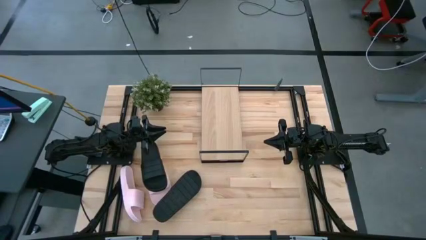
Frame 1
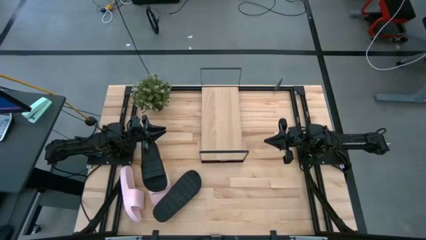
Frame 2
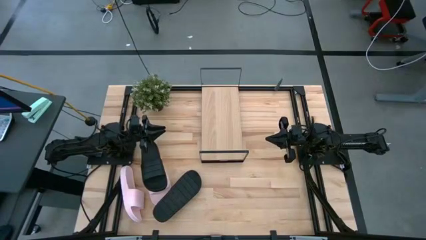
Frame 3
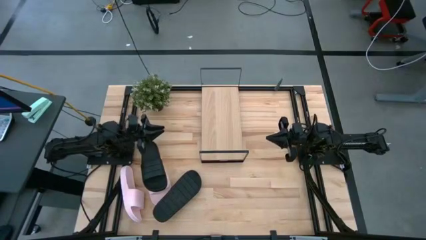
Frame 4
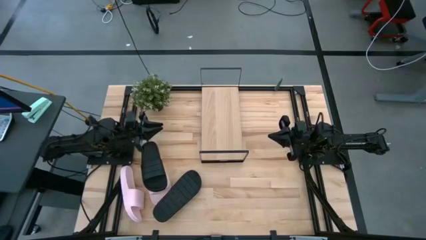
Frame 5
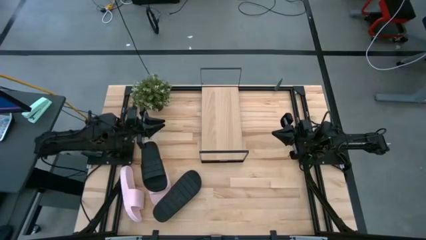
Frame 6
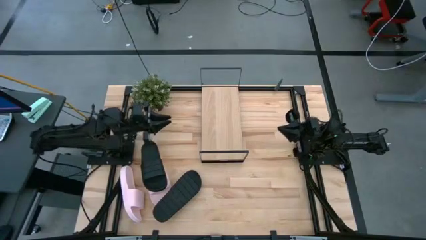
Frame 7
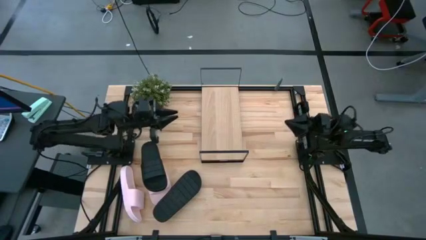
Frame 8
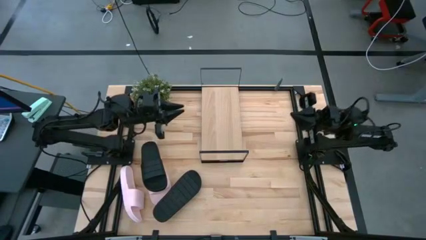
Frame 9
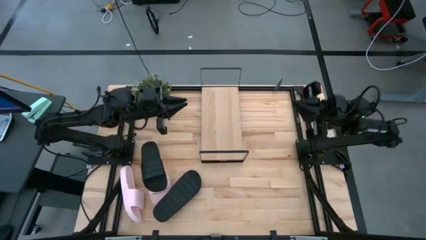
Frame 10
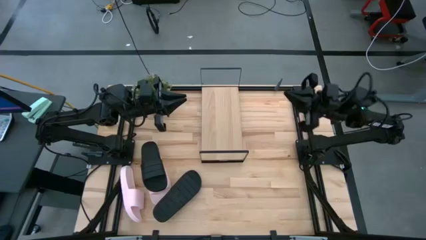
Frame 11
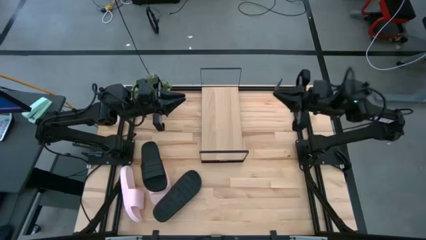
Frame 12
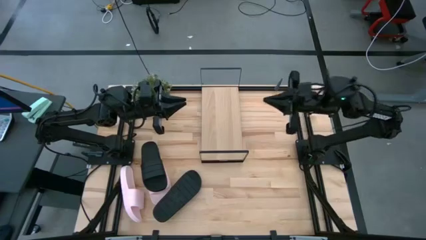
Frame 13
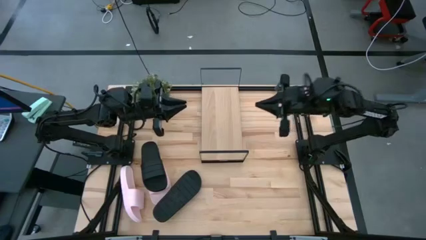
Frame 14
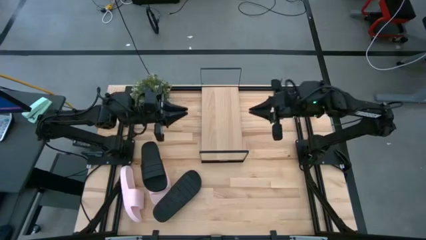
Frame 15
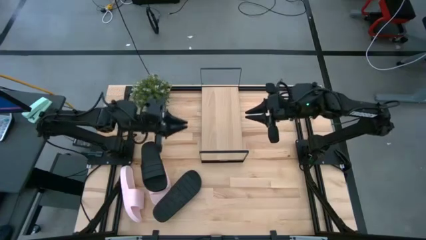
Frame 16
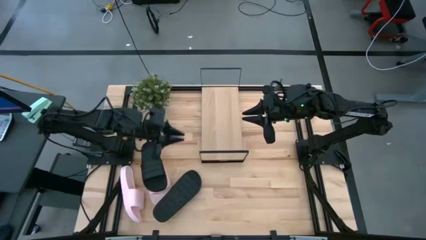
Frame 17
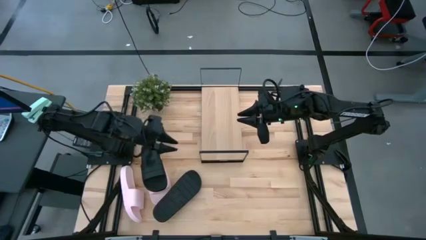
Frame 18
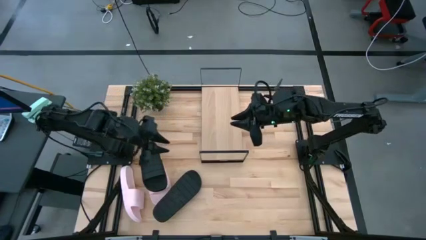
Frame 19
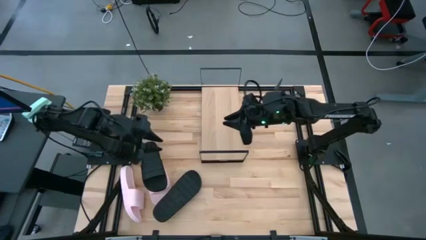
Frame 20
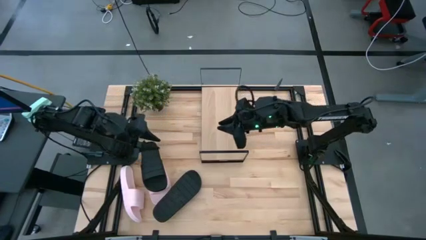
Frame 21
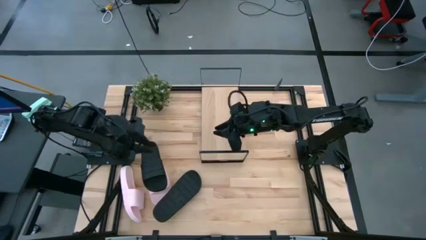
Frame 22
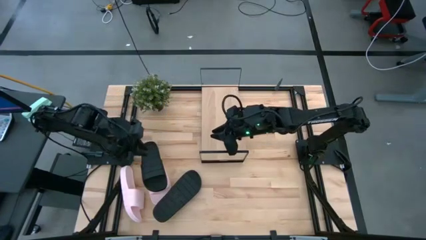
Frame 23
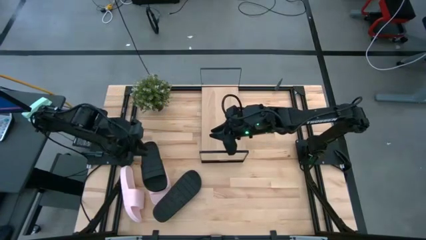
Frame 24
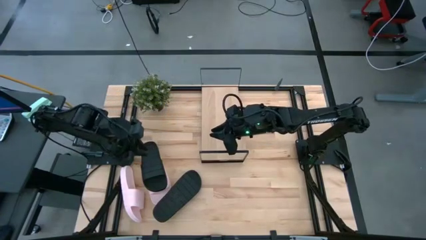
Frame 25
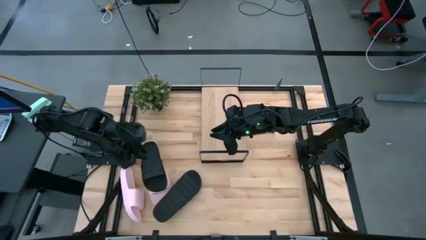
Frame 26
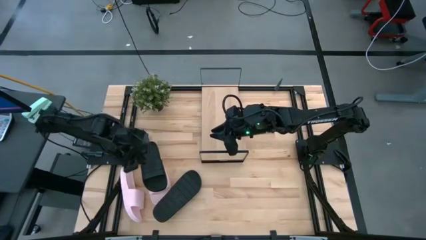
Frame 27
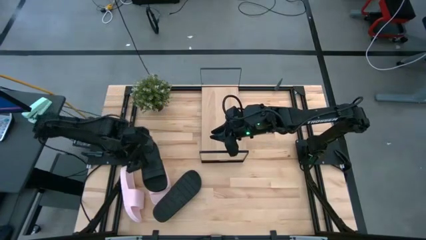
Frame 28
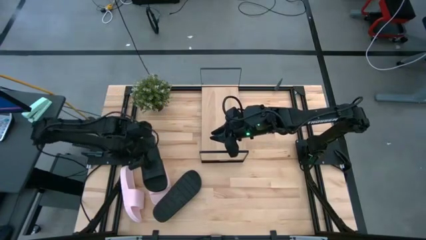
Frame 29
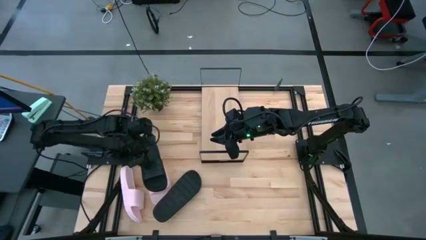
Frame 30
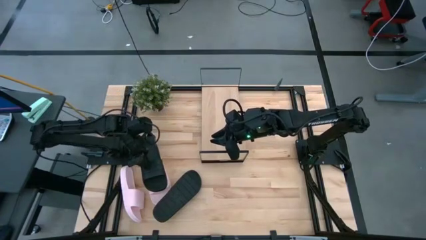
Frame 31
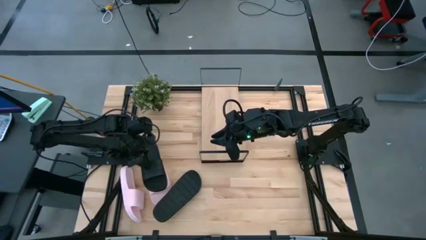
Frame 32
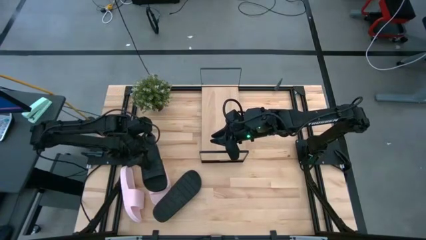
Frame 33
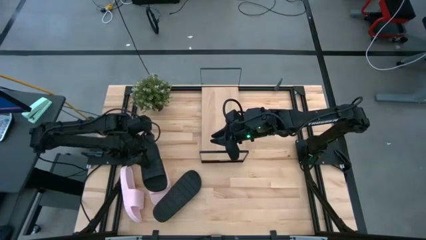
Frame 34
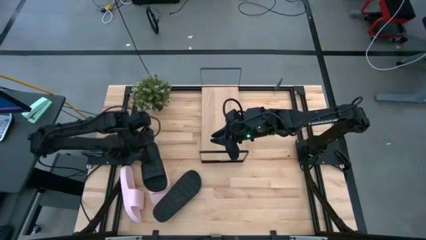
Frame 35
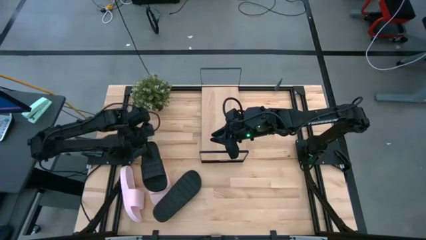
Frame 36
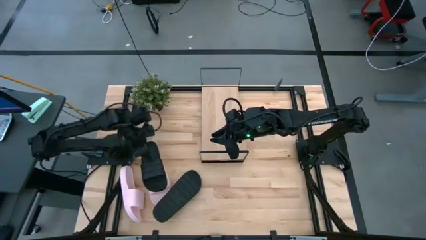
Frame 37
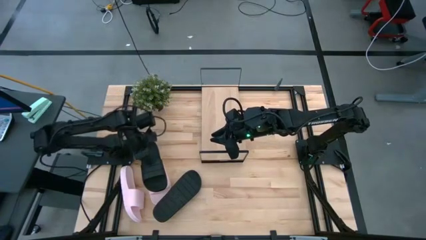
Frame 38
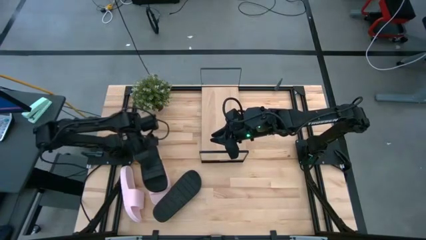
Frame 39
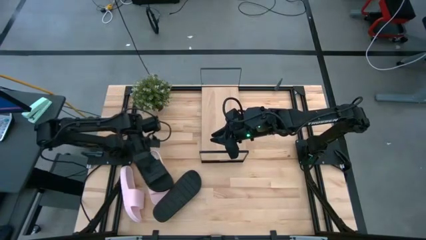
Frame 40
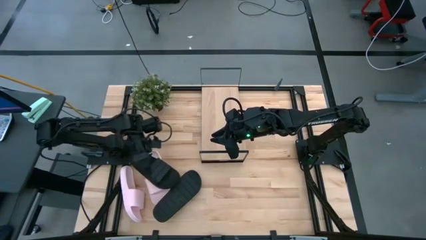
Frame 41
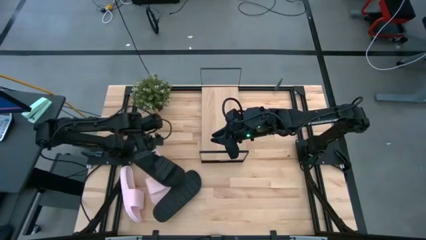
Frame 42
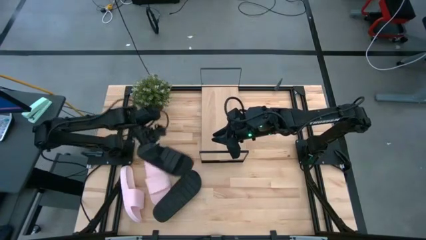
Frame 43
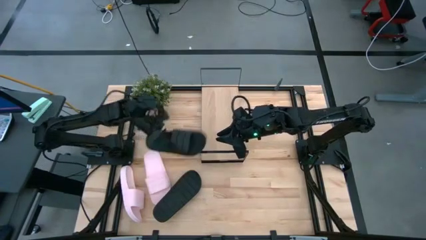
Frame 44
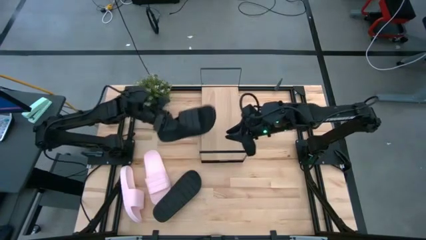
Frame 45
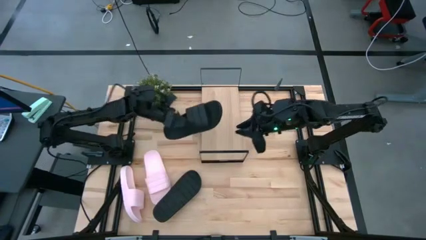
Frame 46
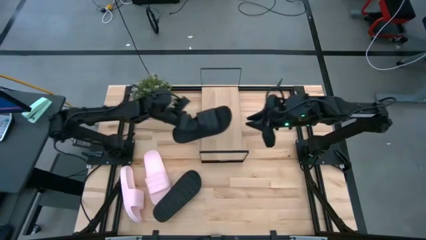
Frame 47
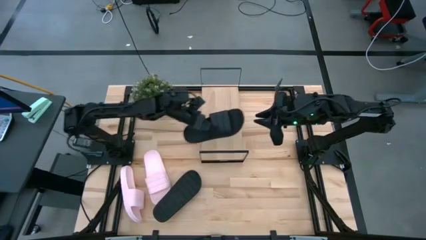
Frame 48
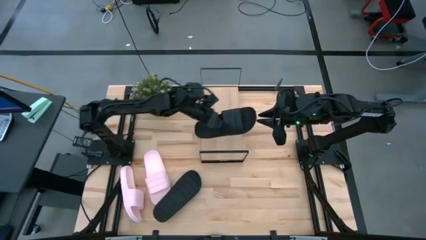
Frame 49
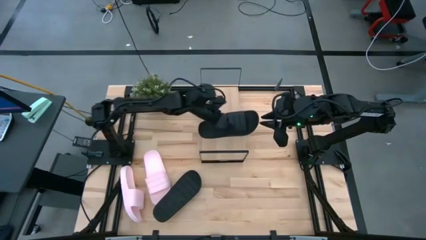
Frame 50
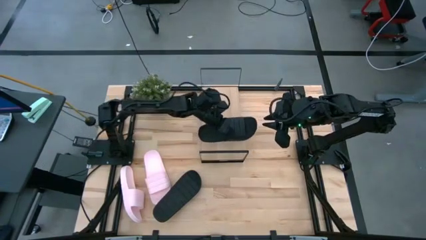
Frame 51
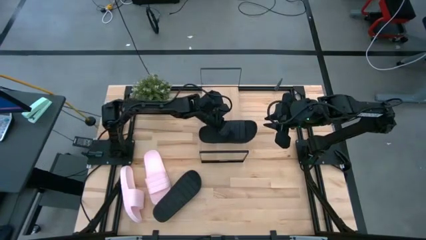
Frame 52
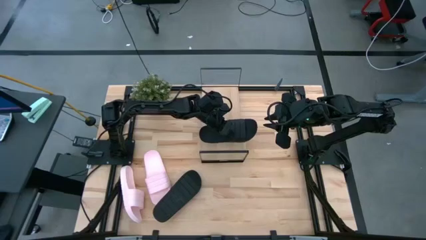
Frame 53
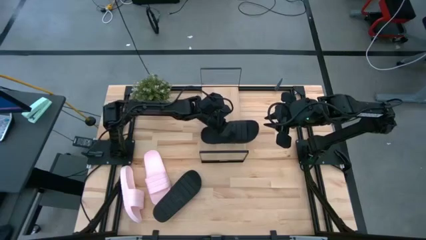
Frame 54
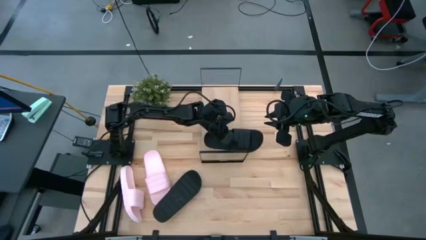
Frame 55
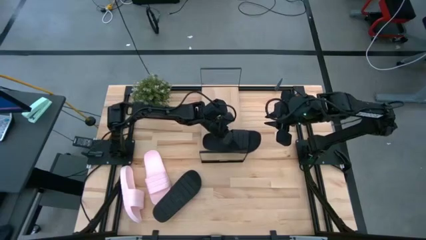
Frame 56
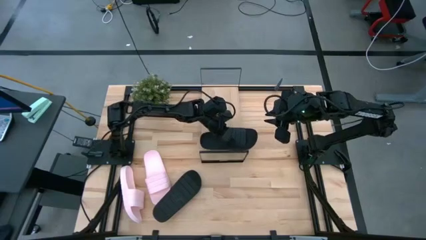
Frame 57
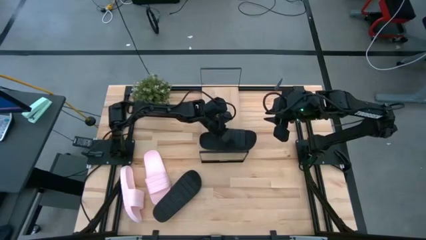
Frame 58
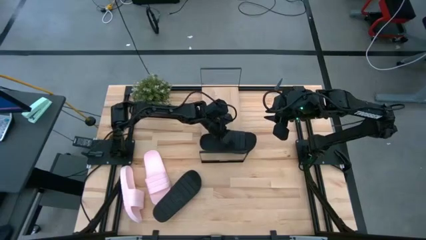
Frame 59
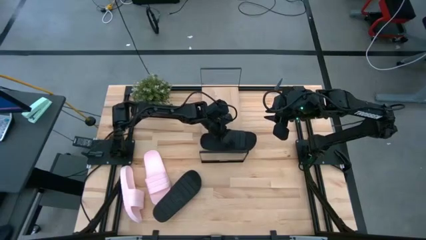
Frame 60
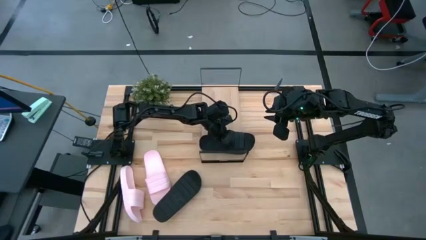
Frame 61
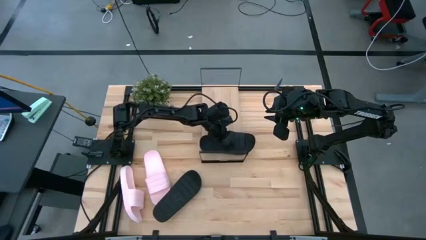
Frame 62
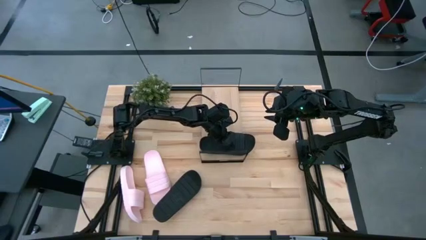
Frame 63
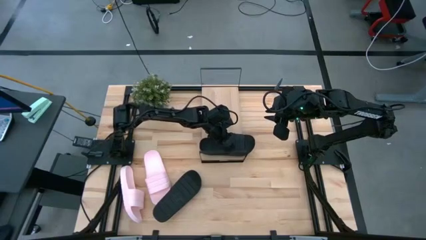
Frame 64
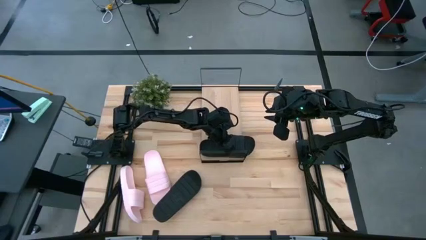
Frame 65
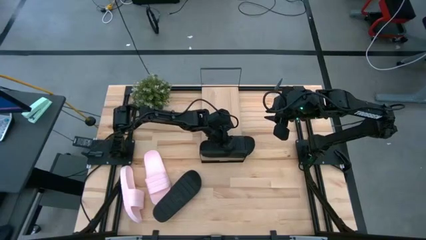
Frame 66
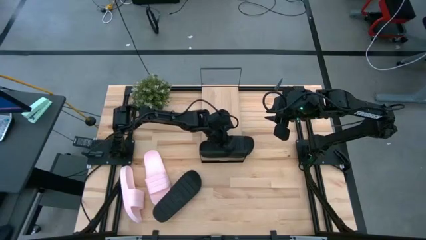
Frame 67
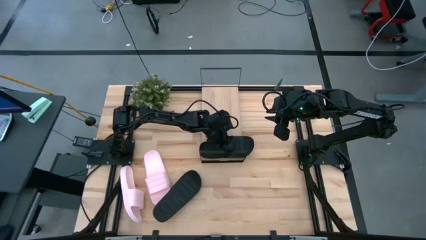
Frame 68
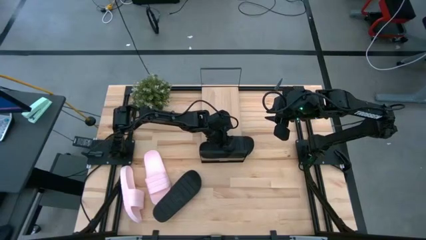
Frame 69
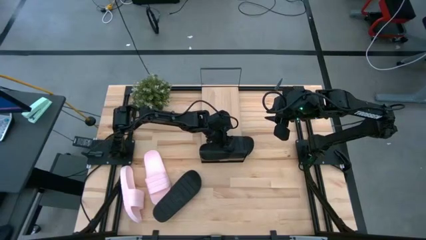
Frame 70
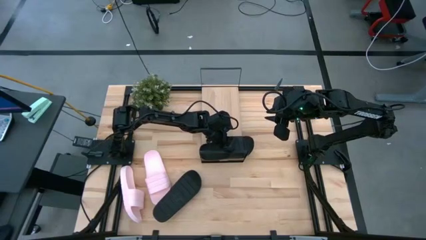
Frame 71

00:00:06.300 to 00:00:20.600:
Task: Pick and place slides into the shelf
Put the left black slipper on the shelf

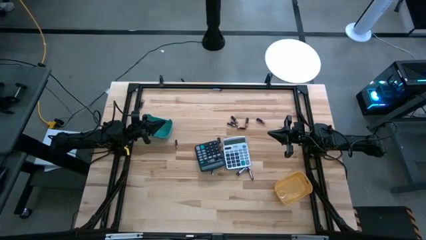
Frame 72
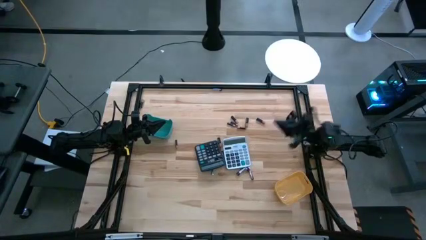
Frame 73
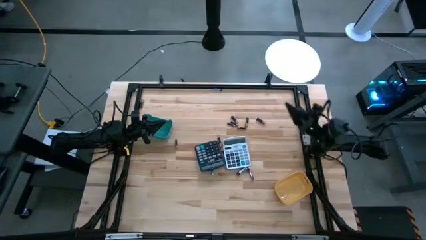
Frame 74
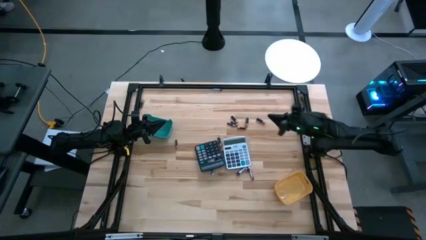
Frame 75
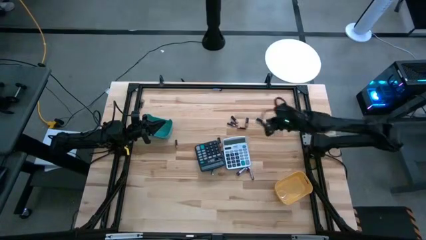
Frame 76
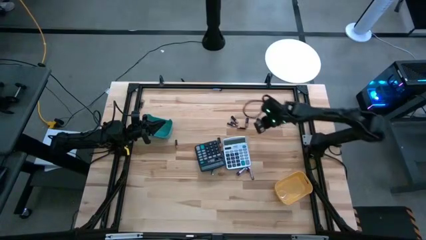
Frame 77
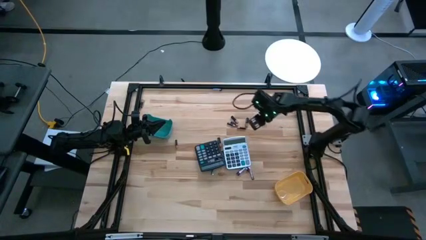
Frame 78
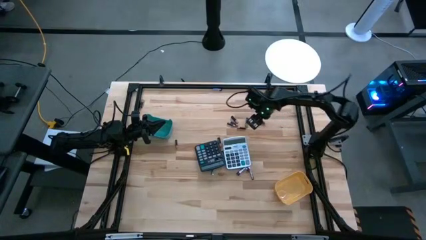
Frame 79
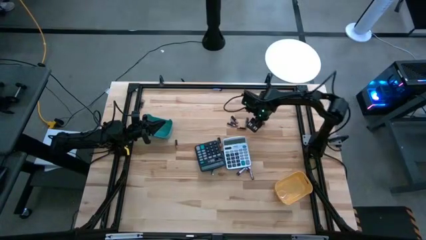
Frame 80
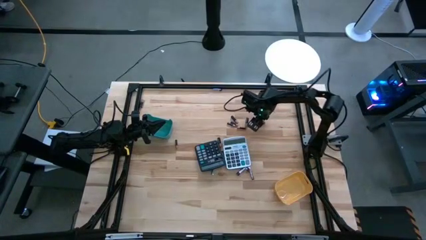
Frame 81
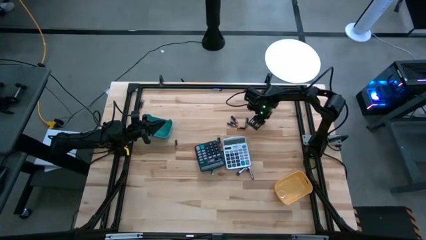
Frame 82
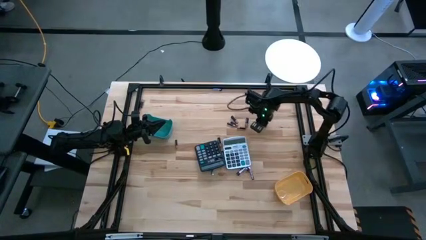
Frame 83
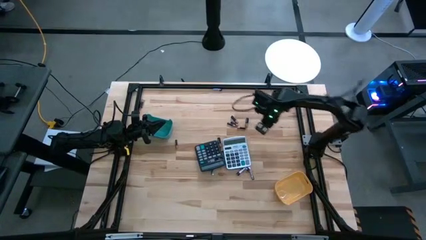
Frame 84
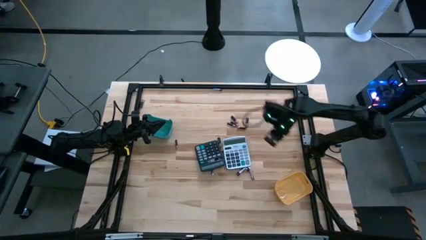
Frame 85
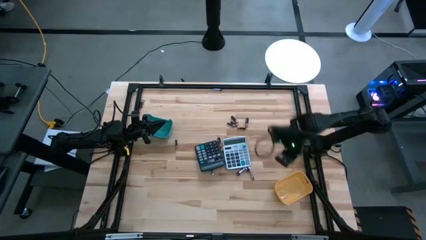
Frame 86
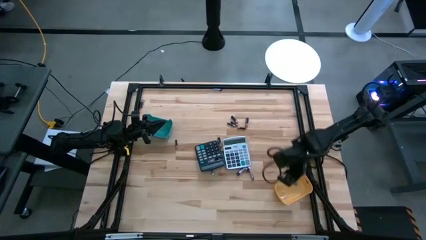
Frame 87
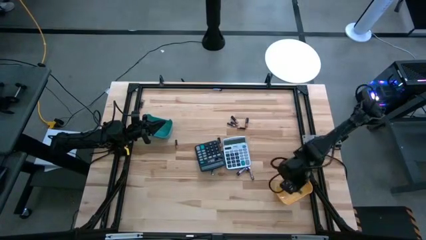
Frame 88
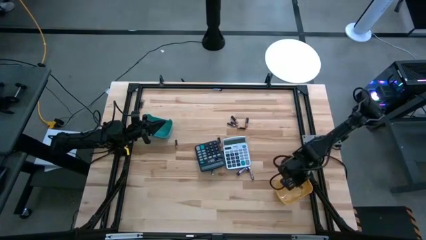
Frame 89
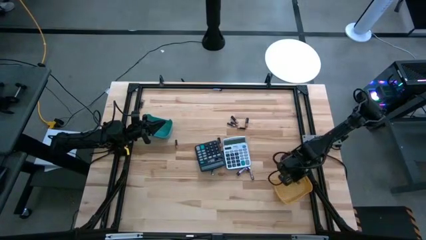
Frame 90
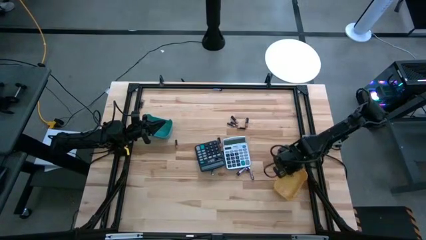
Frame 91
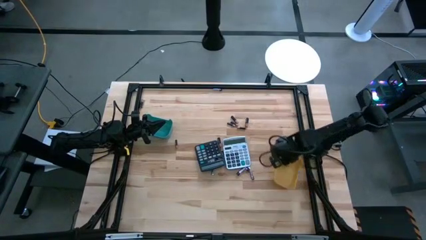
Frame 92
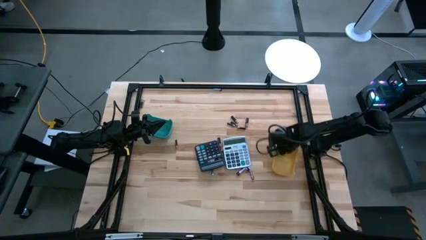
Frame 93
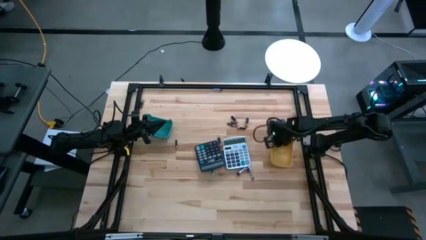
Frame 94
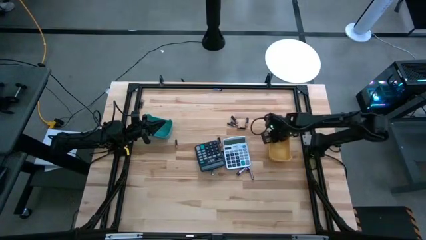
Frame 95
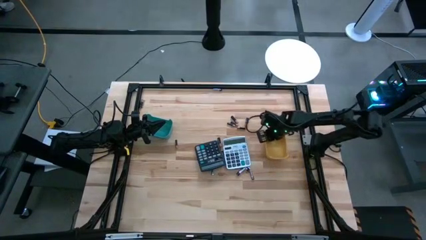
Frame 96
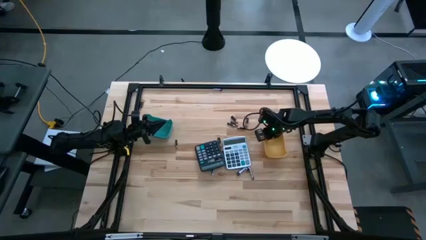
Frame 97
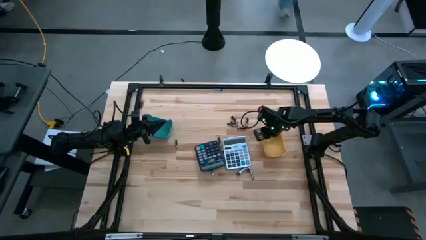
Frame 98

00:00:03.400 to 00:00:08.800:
Task: Sort batteries
Put the black battery into the yellow bin
